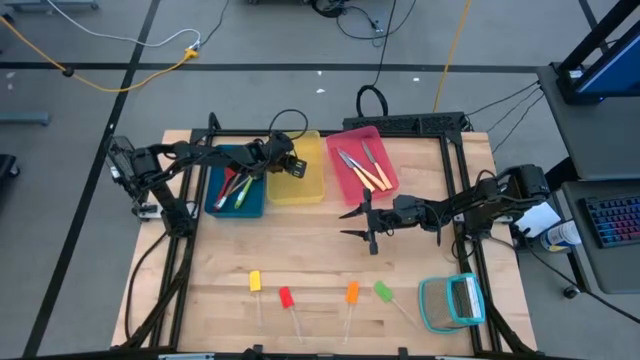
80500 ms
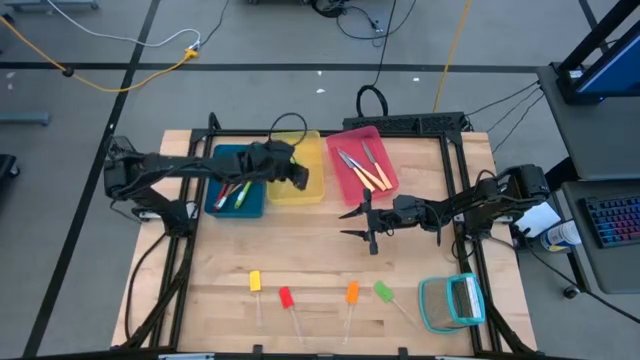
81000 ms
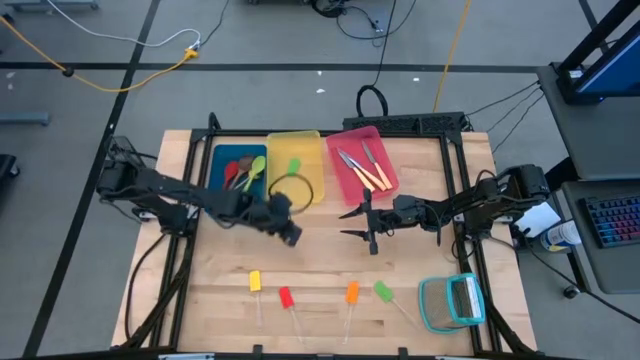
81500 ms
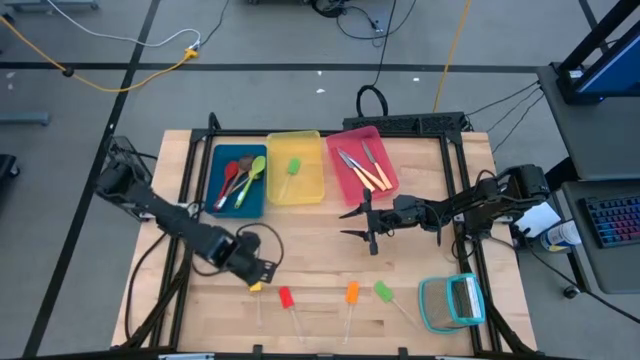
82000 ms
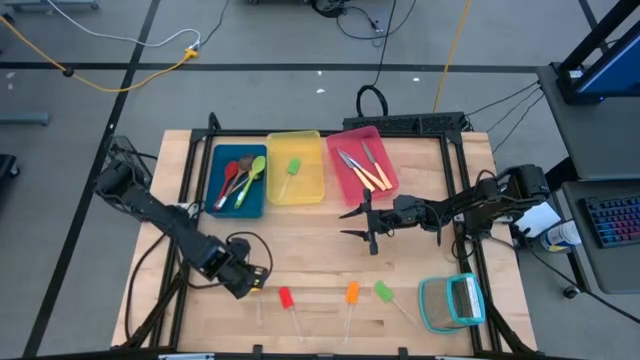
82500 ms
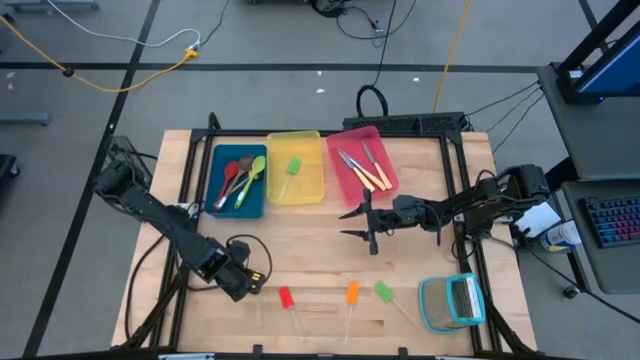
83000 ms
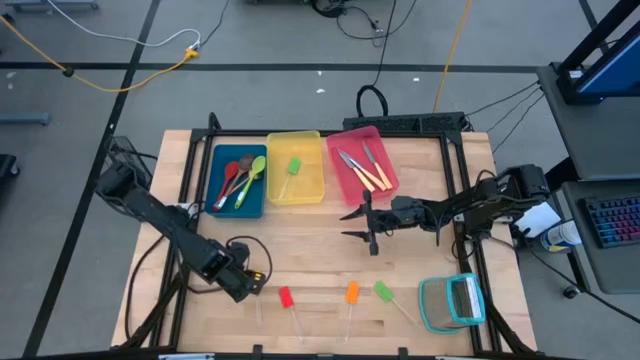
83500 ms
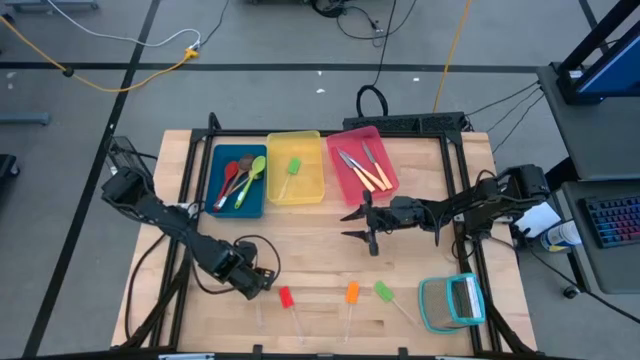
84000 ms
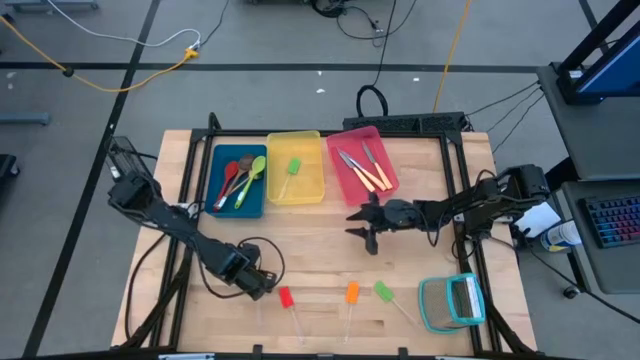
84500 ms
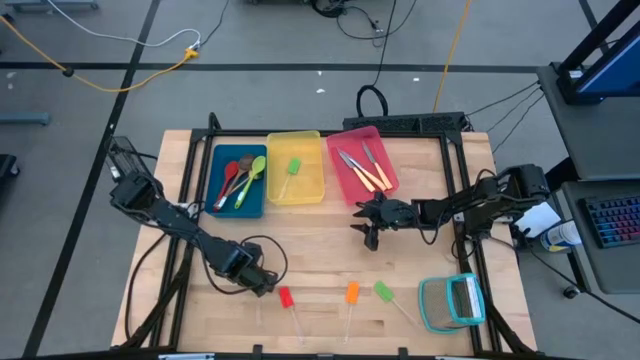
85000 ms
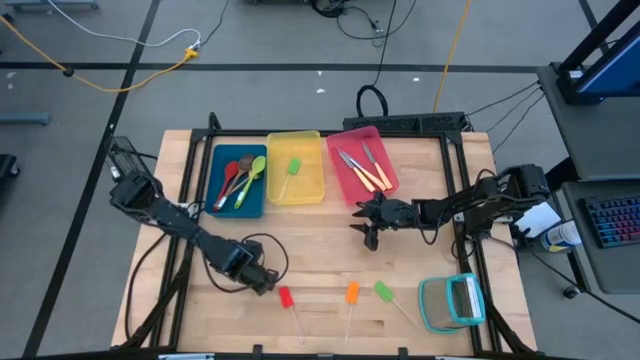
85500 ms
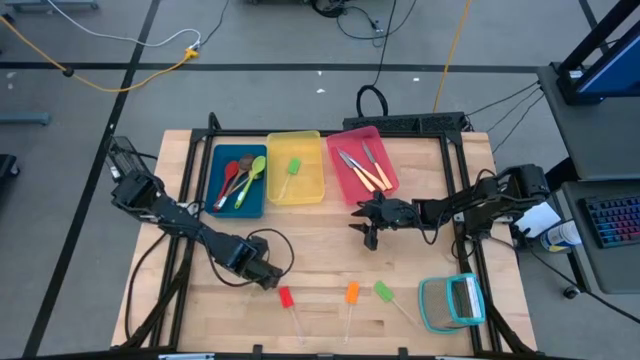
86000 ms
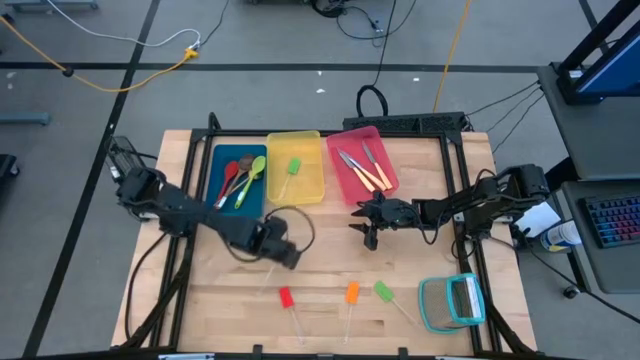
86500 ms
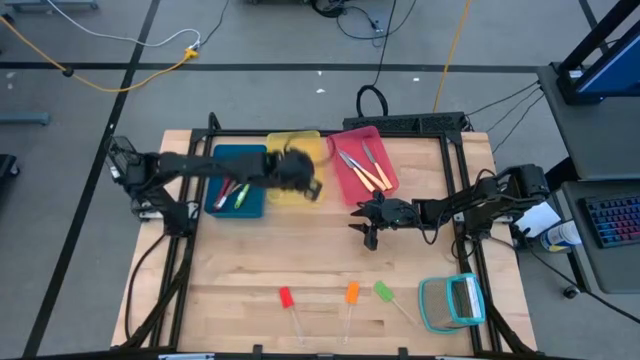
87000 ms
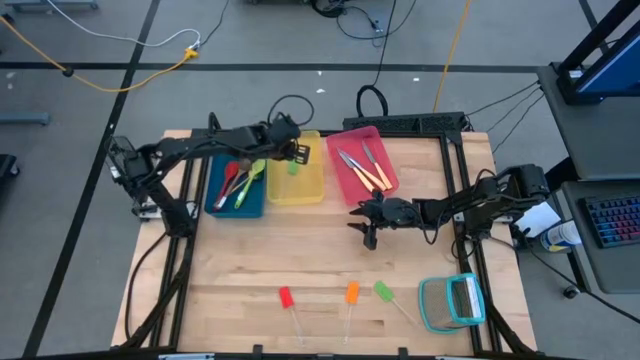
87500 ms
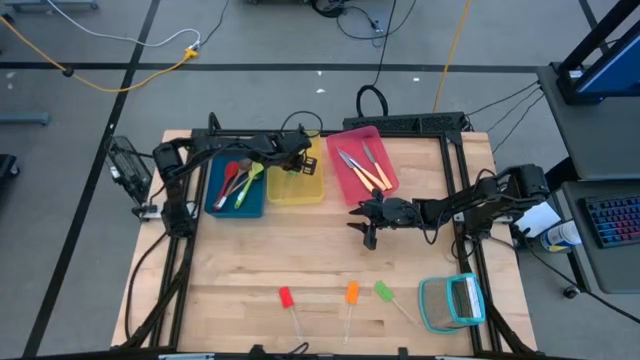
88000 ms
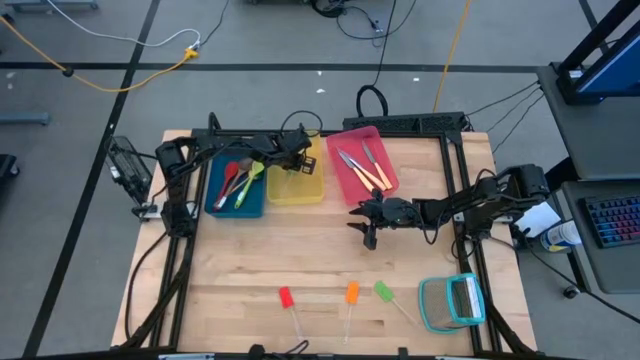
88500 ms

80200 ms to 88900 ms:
Task: Pick & Place Kitchen Items
Put the yellow spatula into the yellow bin

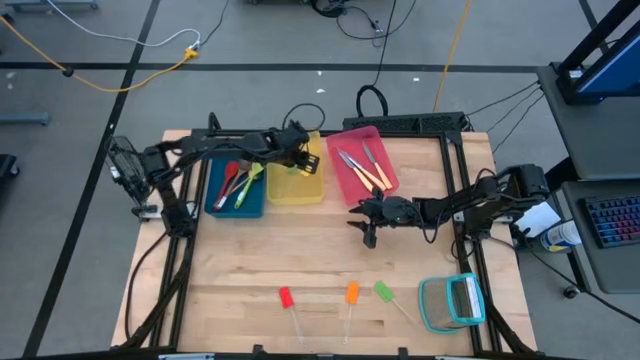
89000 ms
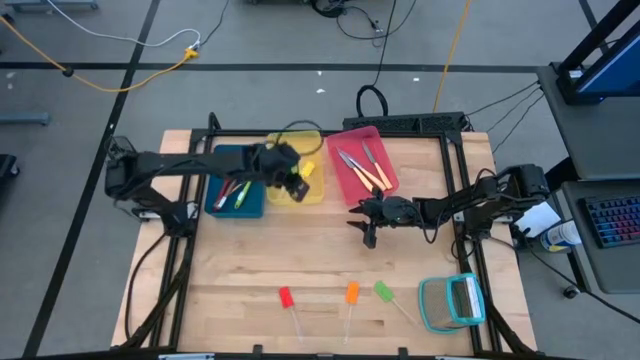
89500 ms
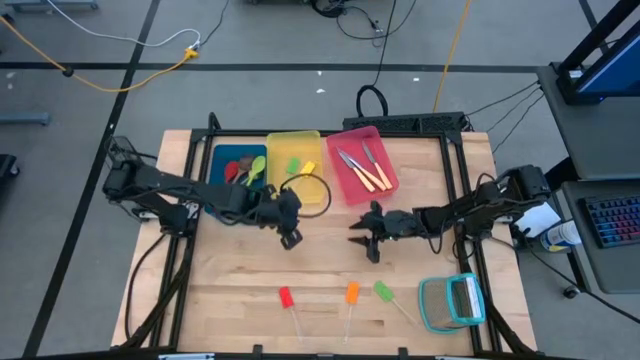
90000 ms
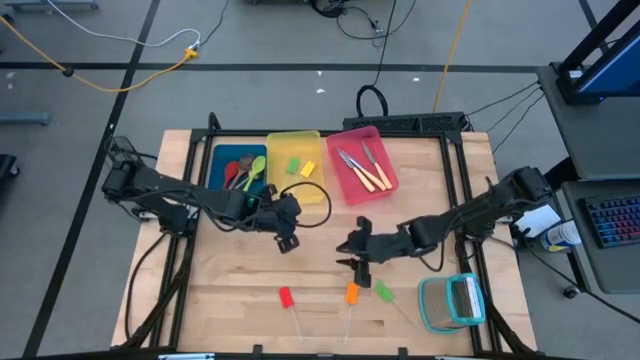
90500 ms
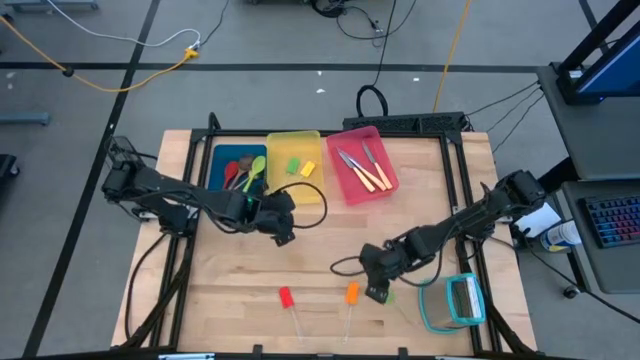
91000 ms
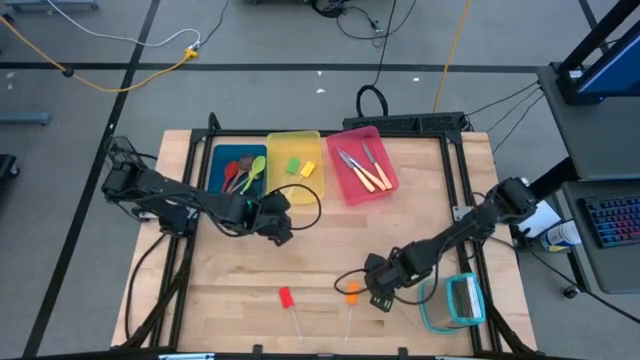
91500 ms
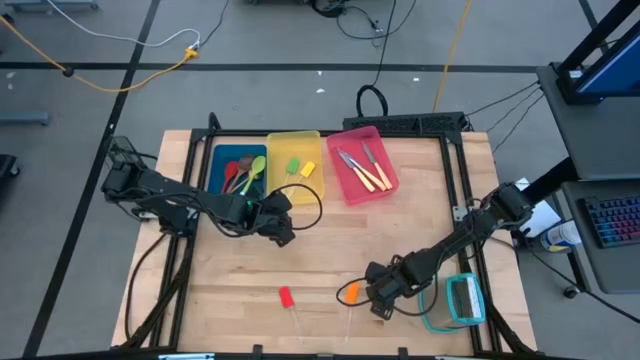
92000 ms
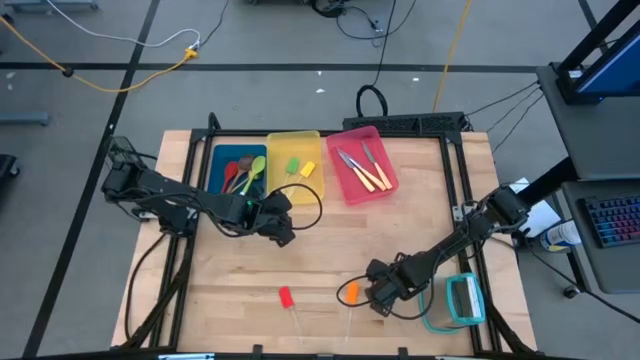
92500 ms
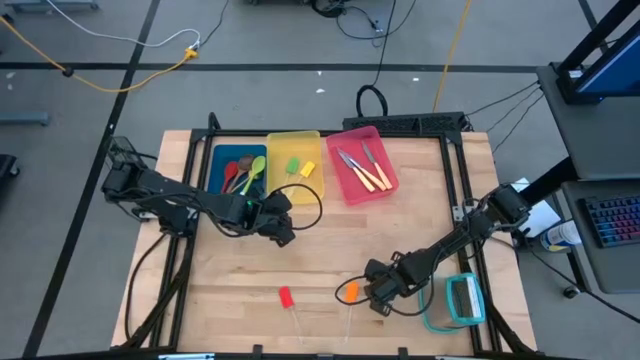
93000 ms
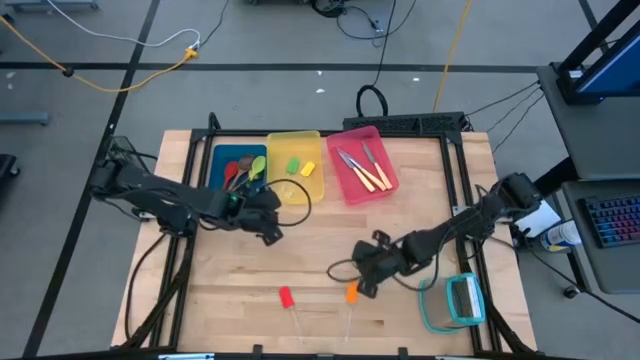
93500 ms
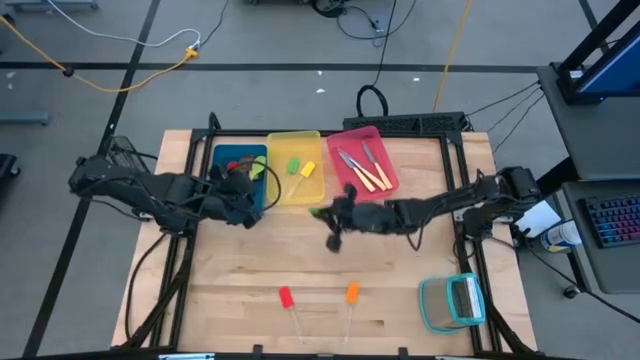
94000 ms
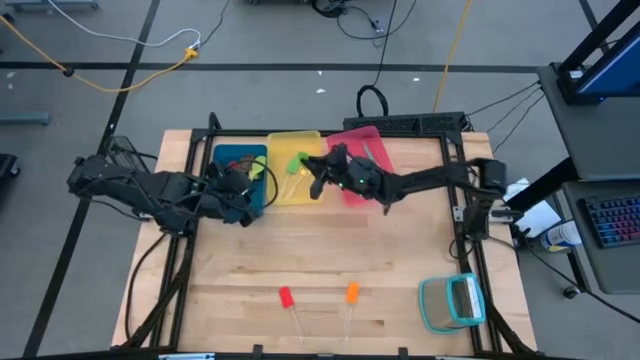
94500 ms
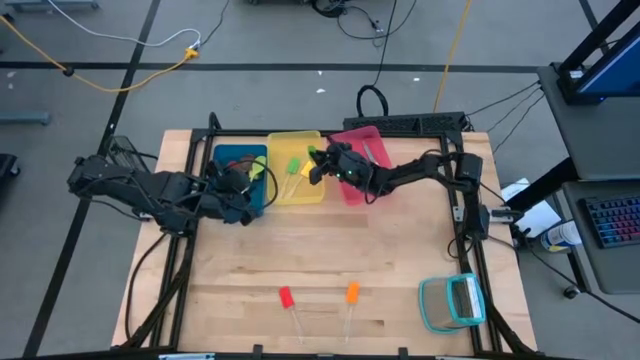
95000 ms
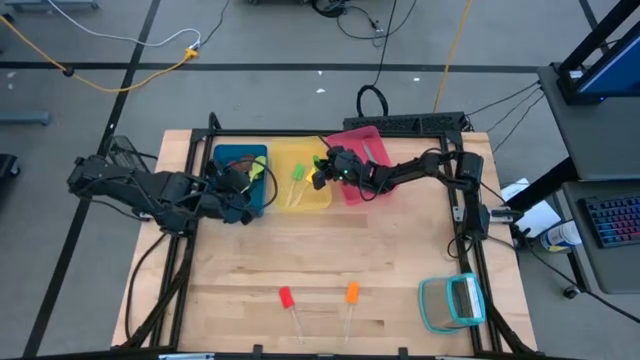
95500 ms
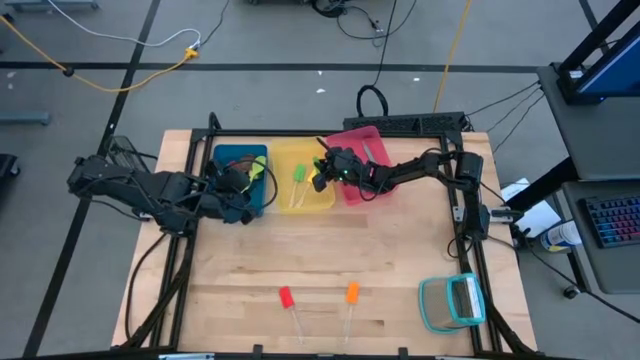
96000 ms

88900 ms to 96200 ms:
Put the green spatula into the yellow bin

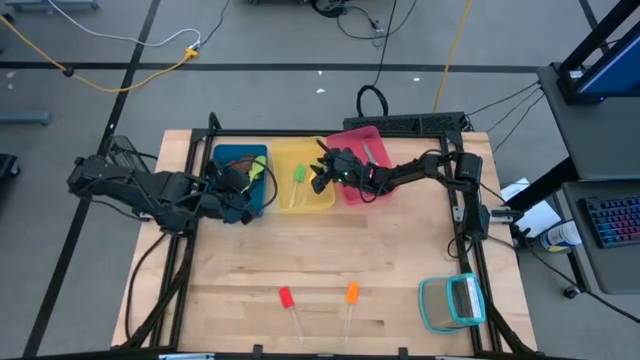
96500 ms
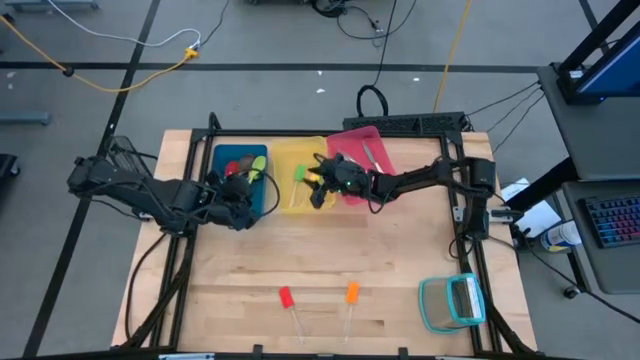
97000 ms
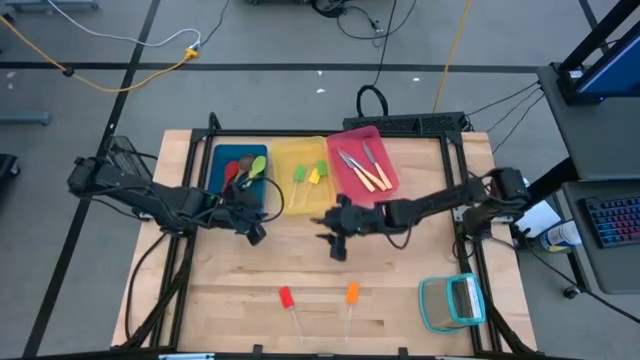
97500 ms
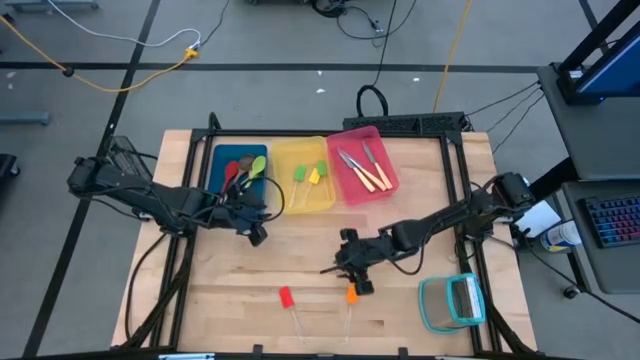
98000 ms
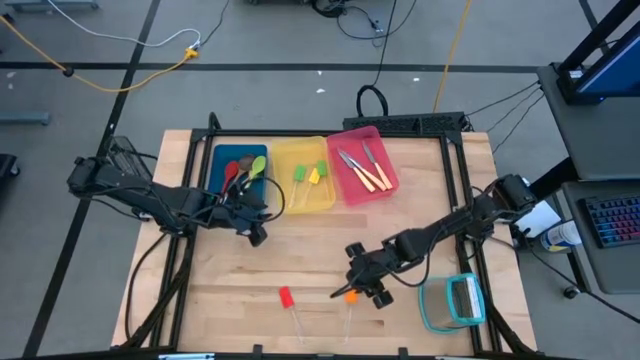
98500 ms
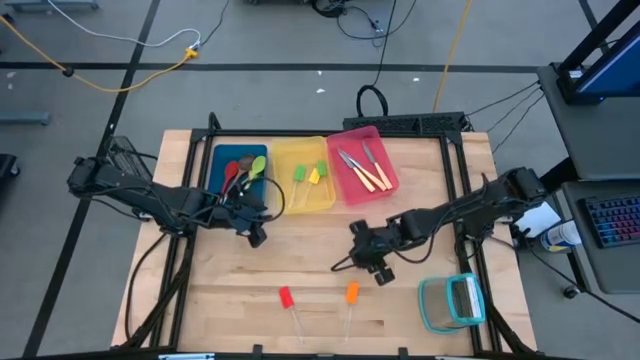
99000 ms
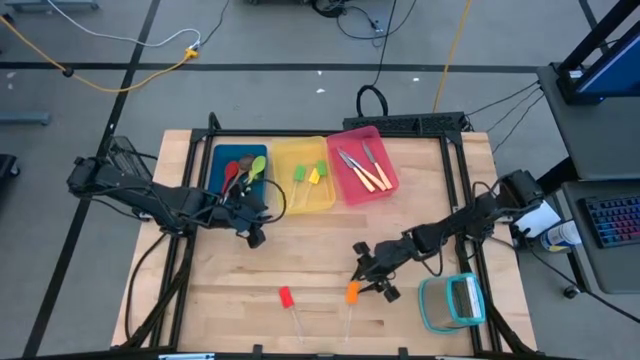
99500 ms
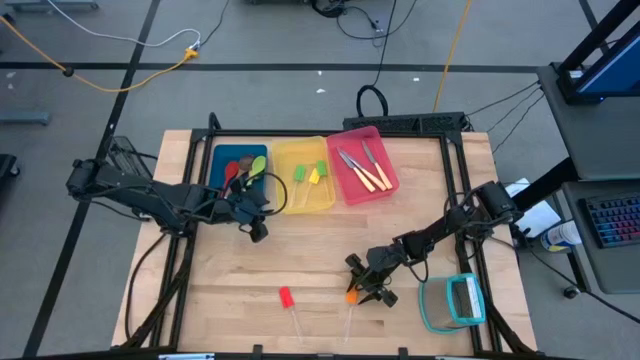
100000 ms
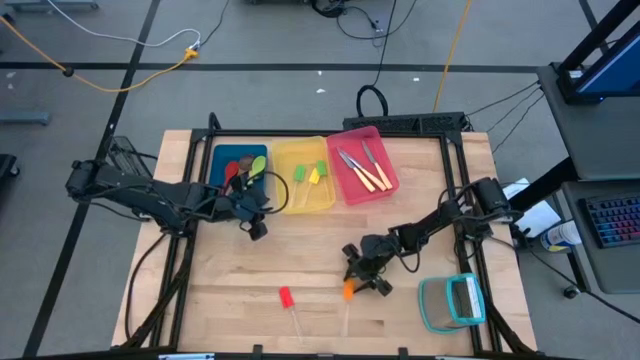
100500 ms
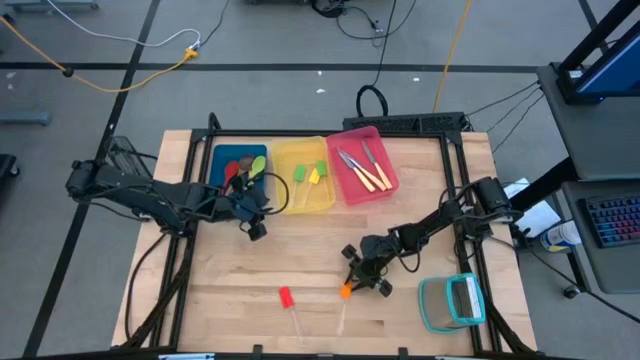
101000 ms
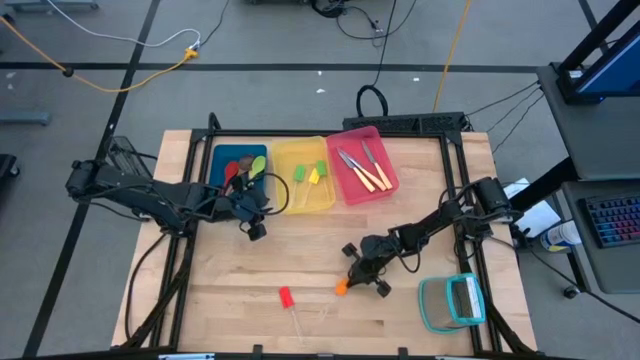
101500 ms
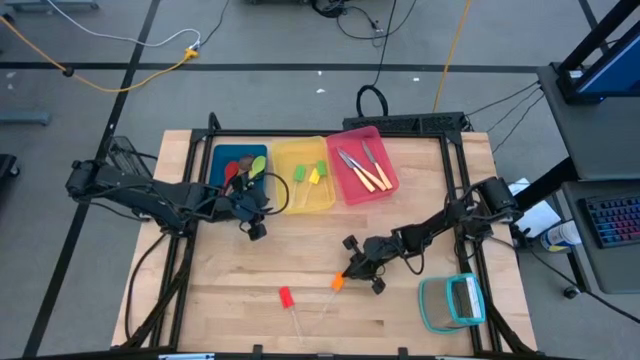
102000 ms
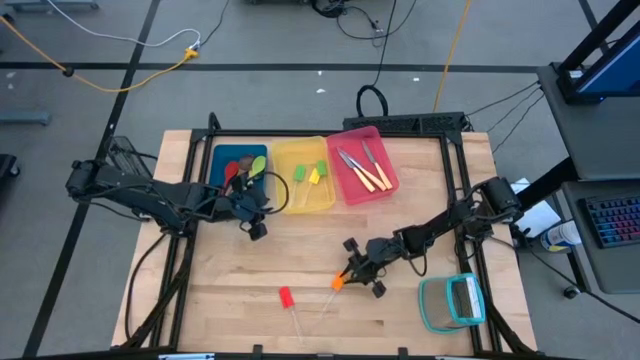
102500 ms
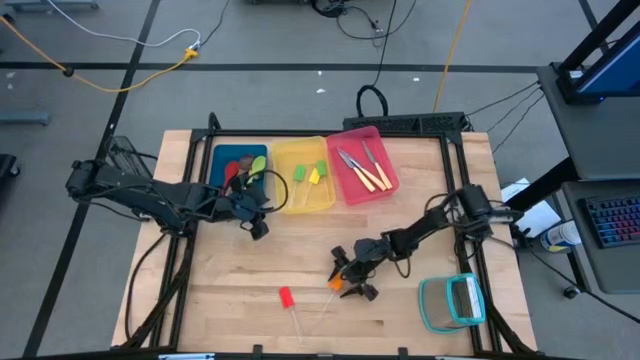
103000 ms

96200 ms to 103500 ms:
Put the orange spatula into the yellow bin
